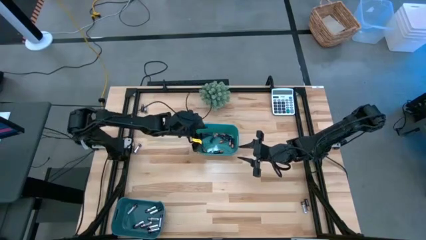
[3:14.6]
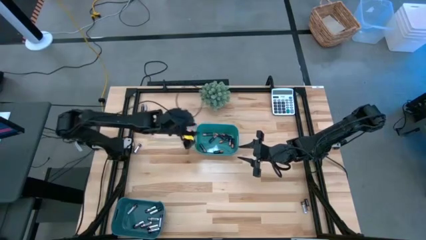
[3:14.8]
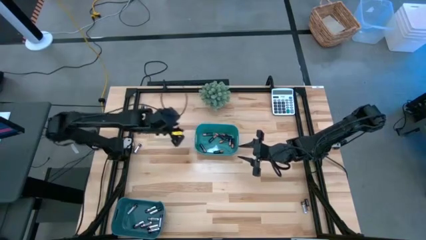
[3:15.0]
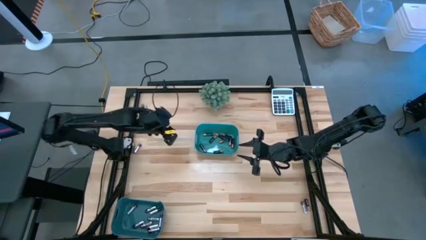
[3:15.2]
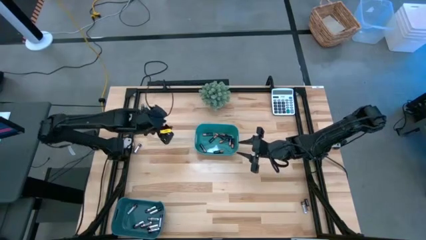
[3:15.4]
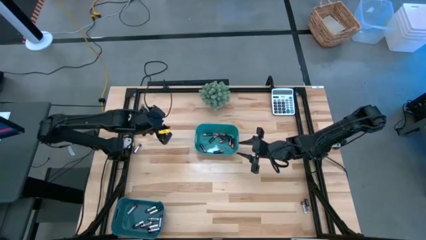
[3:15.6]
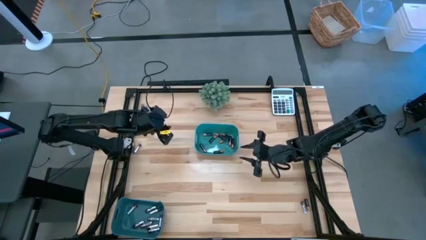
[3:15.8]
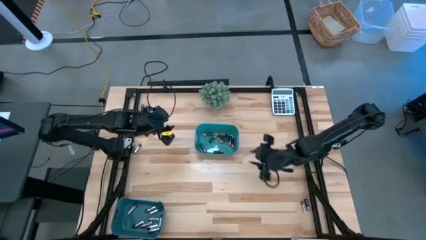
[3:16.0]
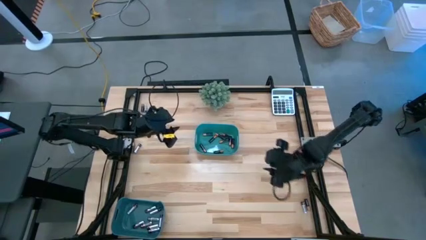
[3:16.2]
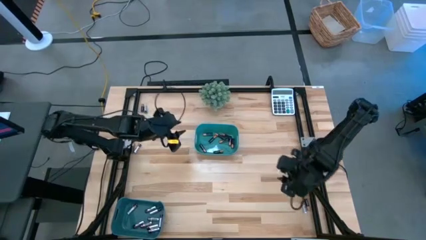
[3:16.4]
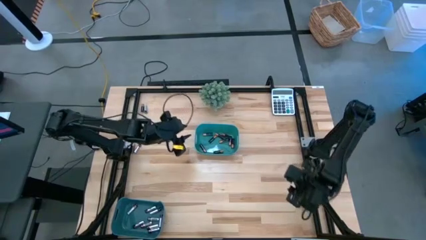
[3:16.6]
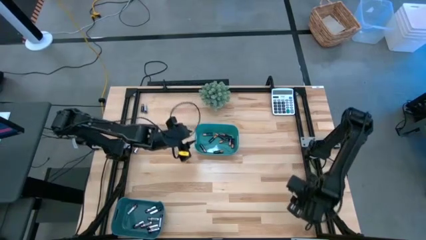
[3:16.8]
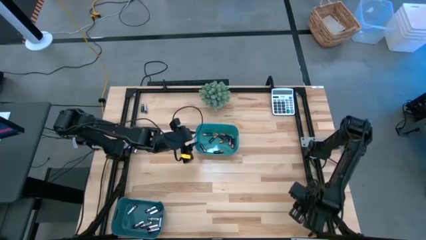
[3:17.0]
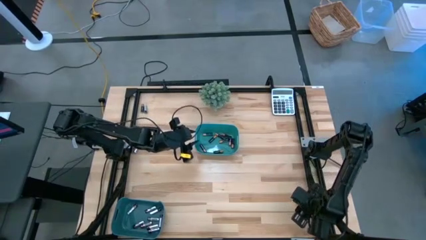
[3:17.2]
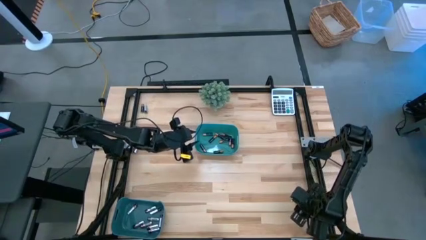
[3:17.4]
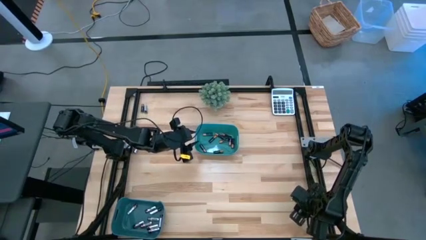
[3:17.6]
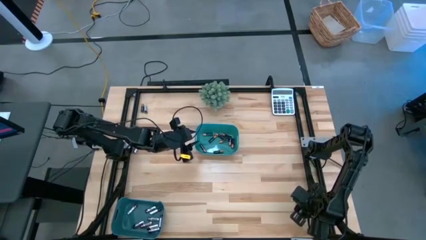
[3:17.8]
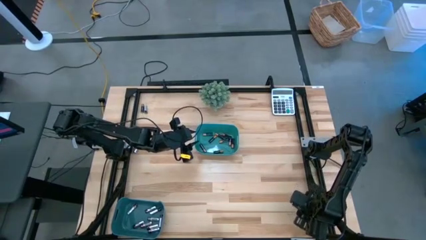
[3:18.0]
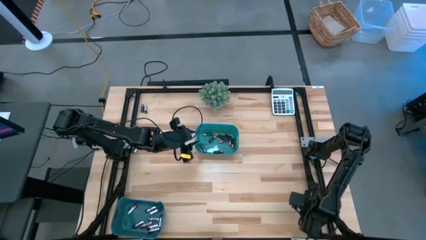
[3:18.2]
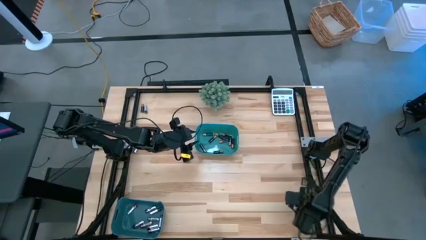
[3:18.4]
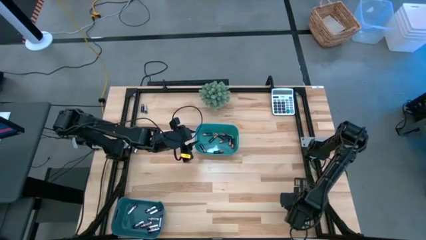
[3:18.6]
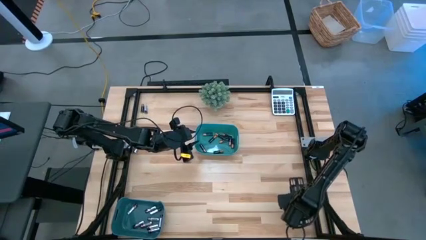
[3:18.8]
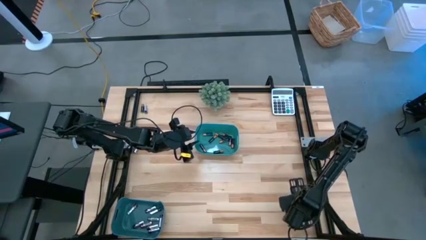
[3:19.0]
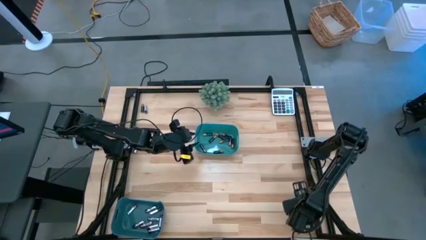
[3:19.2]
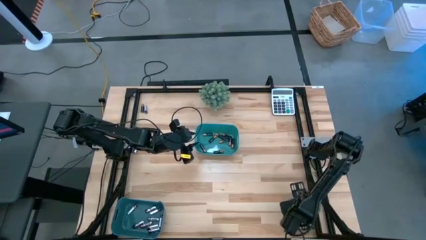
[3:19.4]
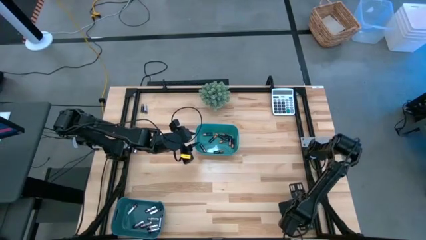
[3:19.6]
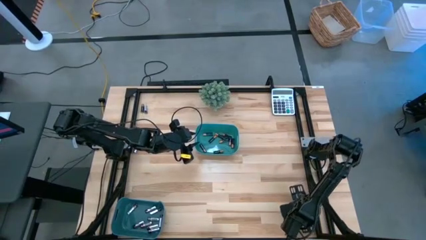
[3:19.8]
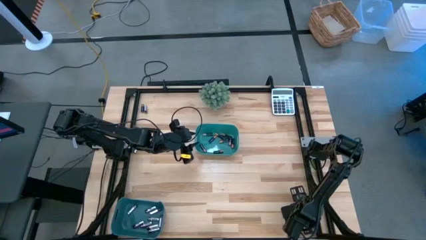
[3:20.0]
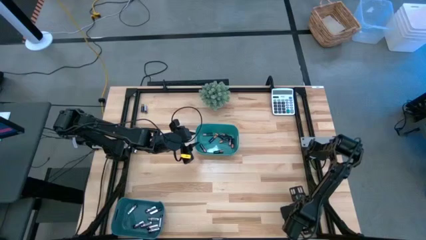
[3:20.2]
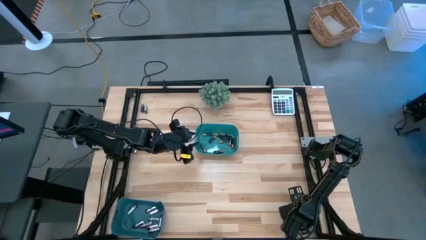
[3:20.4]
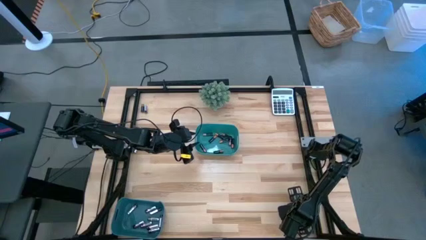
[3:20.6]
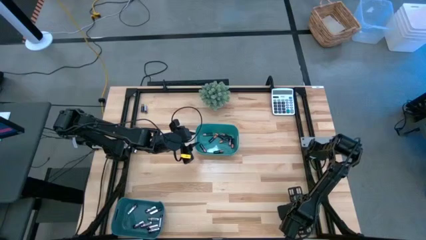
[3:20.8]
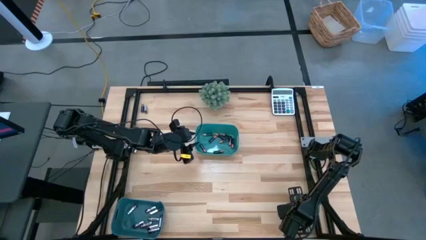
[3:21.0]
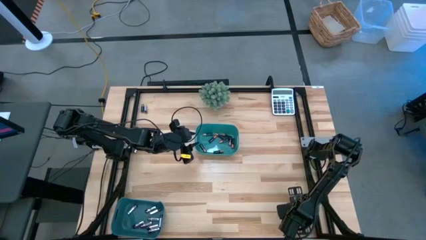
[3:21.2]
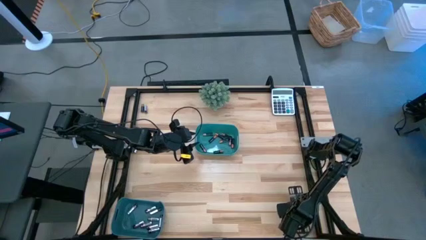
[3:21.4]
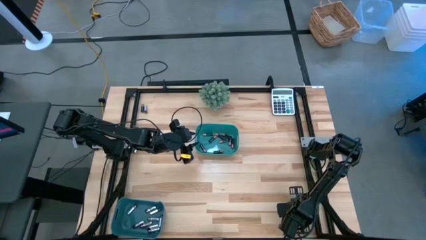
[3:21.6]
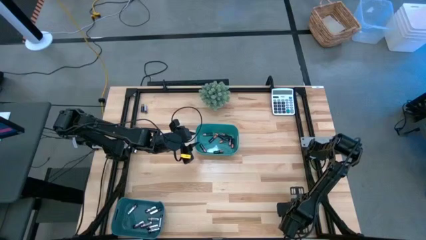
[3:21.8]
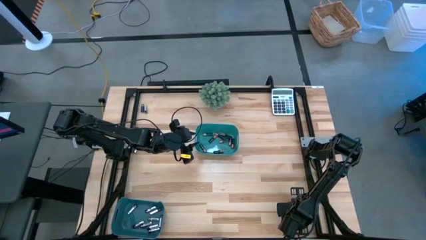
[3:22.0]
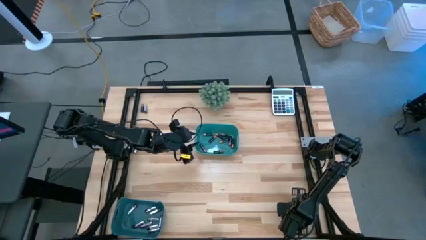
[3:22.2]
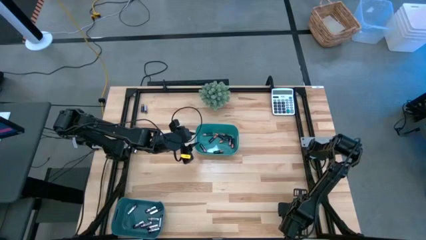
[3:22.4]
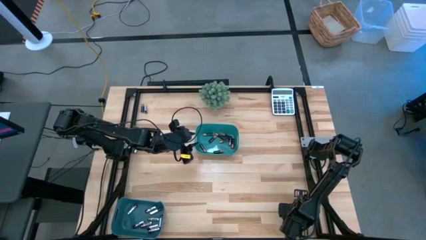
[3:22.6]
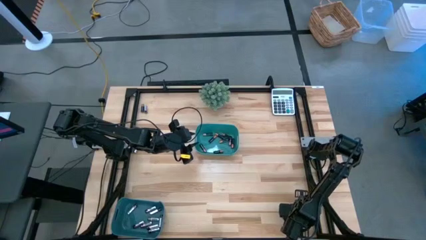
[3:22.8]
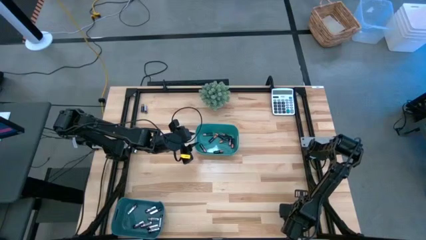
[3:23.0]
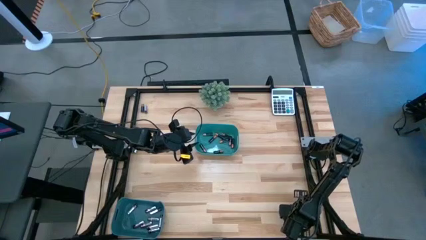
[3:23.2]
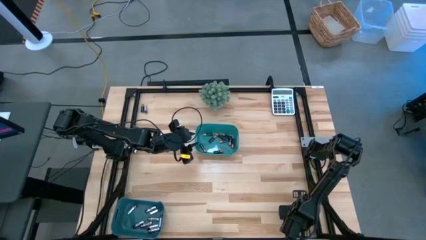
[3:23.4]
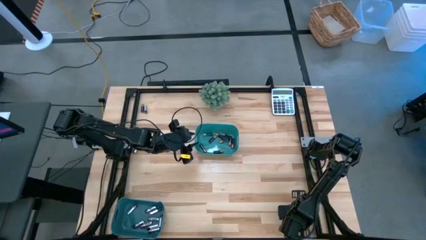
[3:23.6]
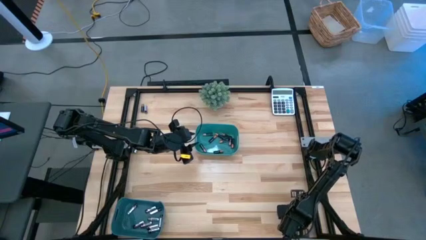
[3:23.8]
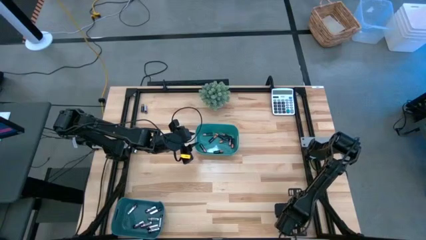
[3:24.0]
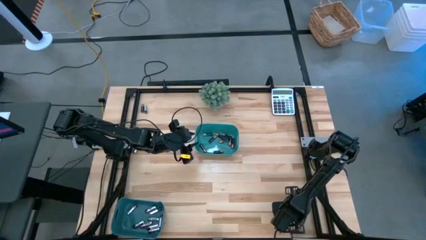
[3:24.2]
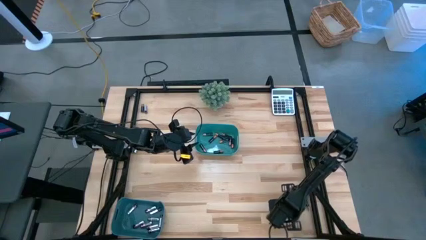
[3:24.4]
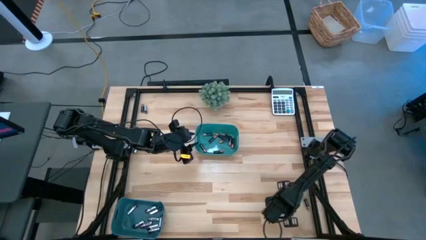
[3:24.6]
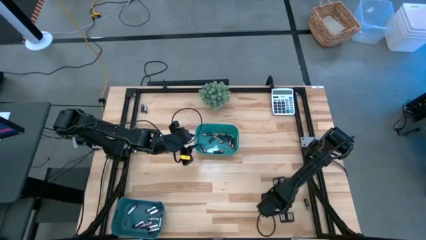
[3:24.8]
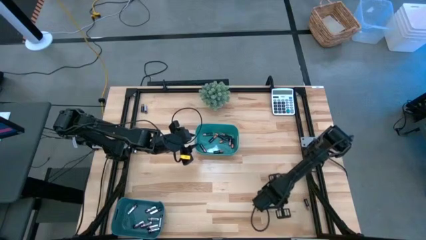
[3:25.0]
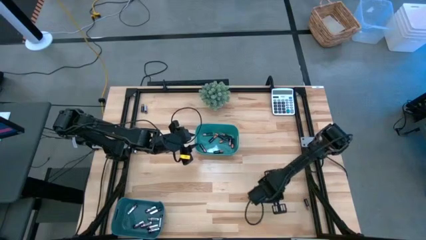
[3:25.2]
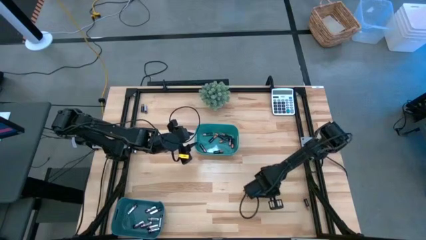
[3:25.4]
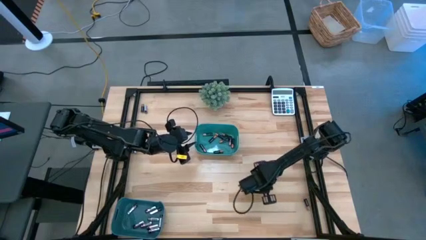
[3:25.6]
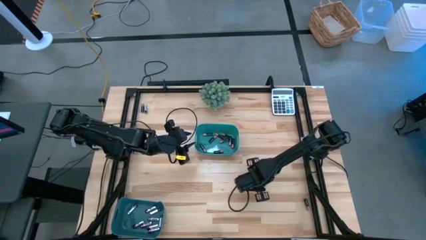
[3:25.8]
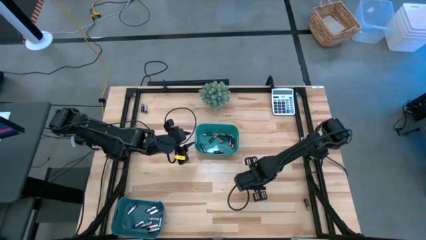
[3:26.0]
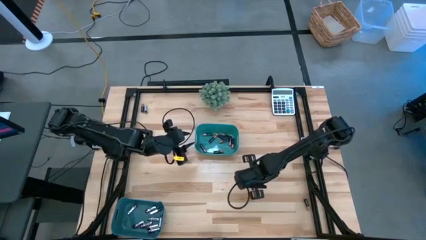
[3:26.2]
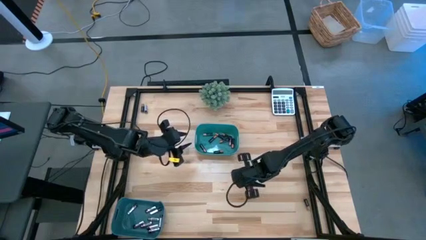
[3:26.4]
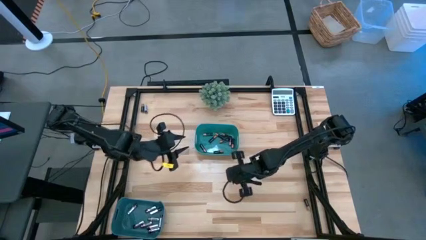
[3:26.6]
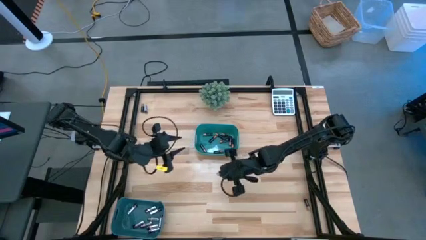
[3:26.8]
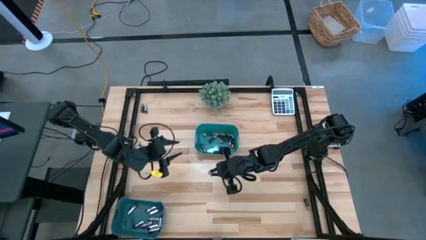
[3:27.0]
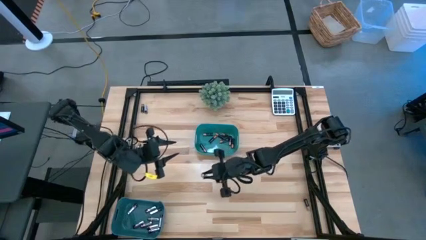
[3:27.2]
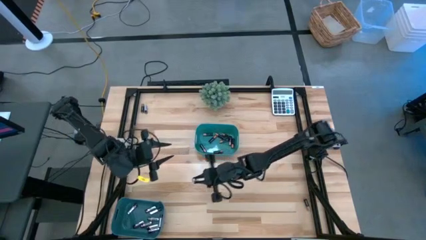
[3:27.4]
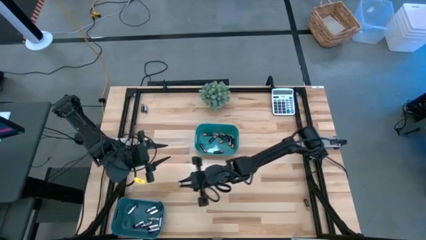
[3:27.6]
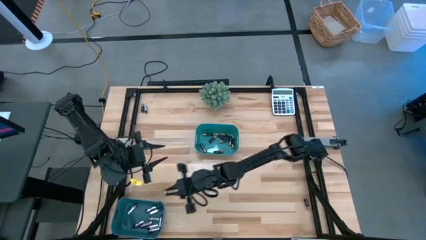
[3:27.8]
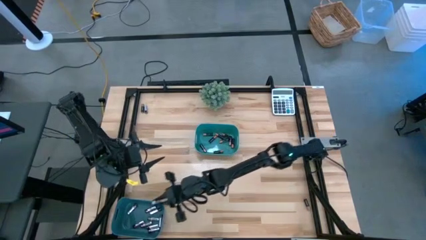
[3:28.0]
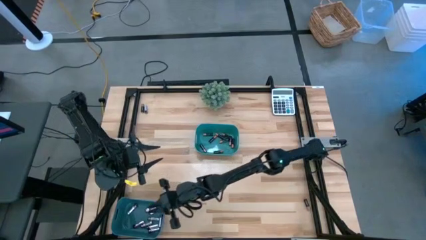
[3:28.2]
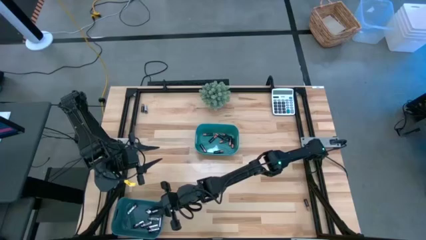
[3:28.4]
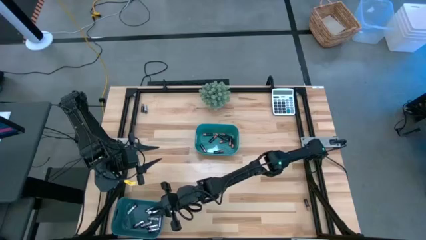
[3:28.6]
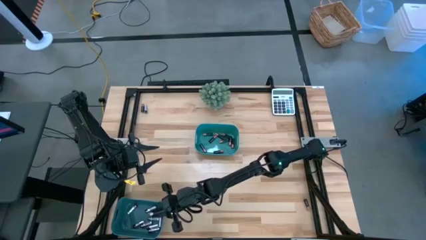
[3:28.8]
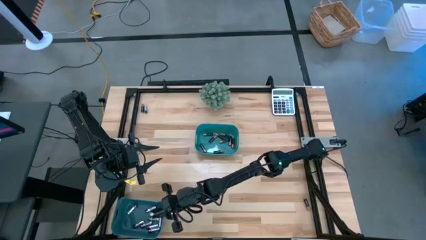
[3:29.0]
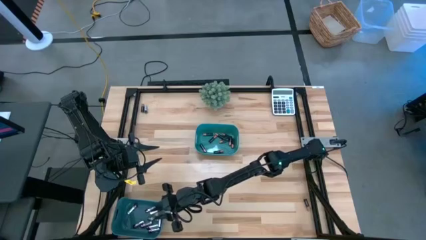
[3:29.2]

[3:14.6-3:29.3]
Task: Sort batteries
Put the silver battery into the blue bin
